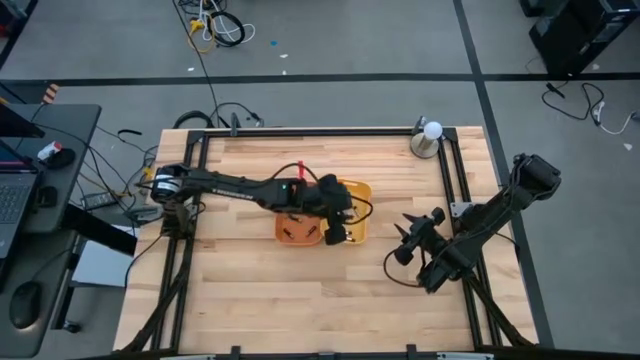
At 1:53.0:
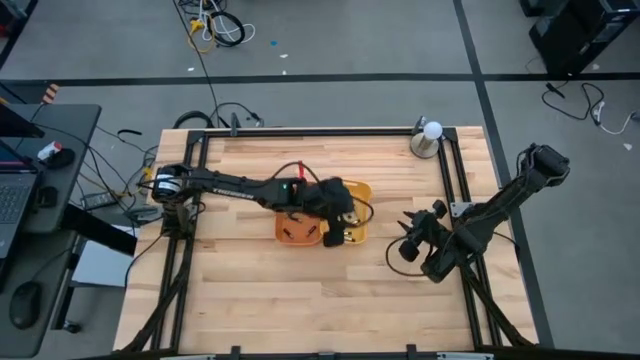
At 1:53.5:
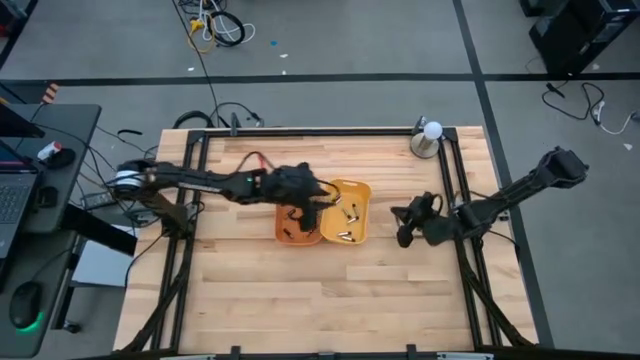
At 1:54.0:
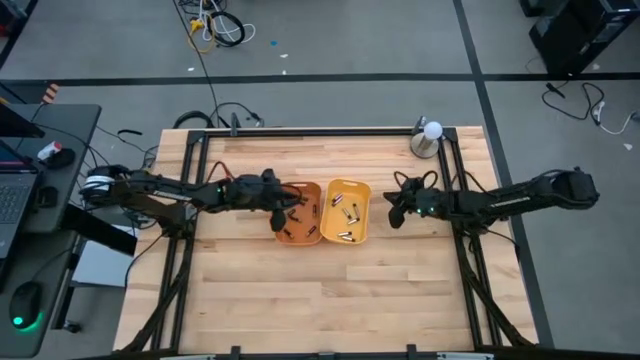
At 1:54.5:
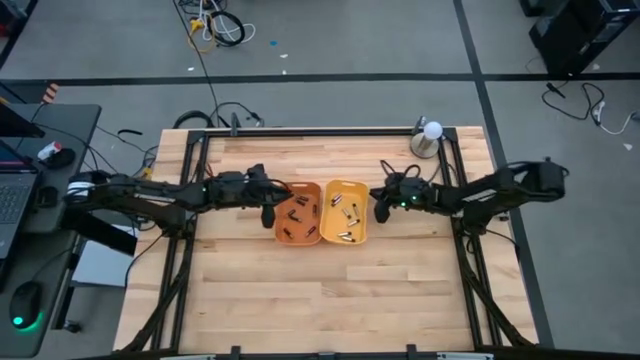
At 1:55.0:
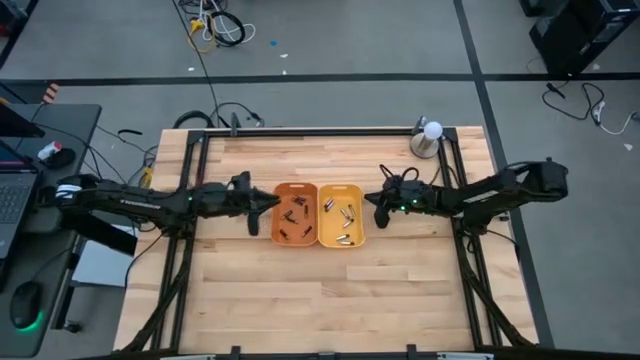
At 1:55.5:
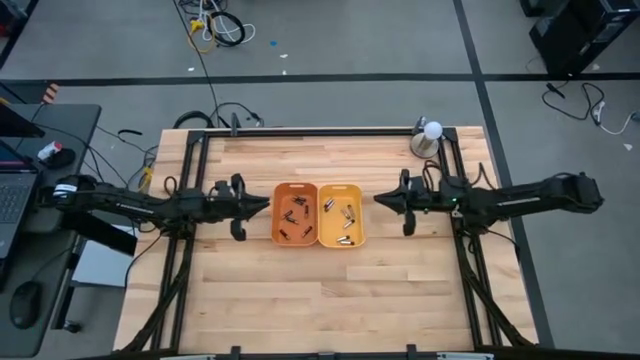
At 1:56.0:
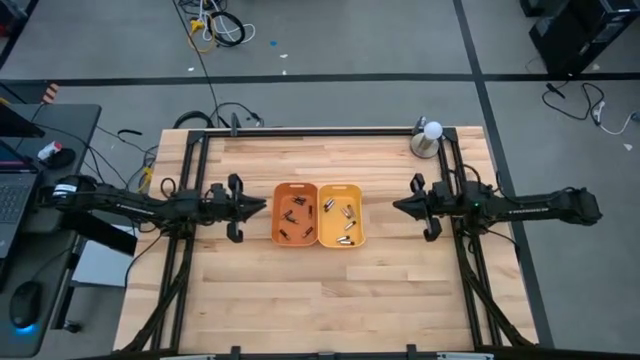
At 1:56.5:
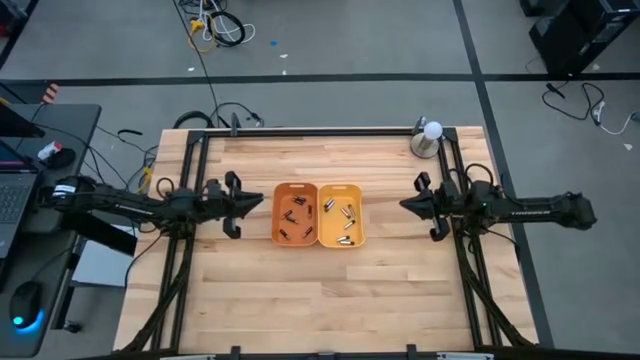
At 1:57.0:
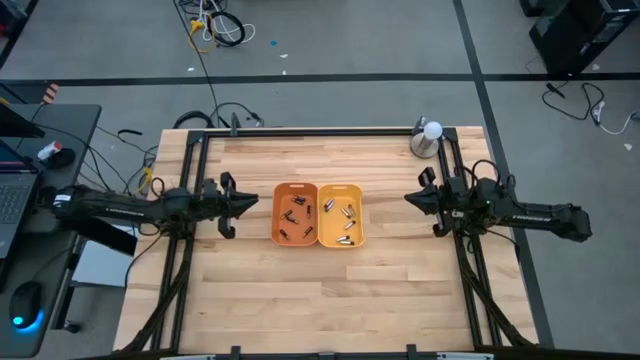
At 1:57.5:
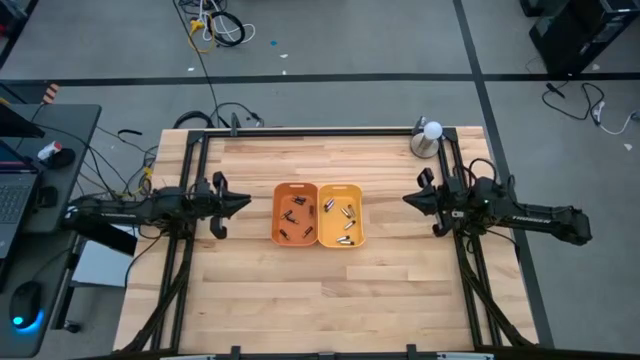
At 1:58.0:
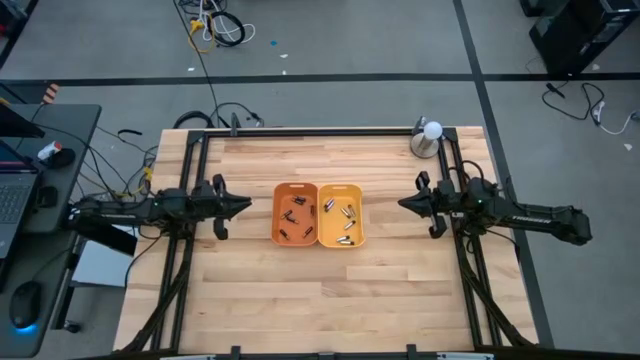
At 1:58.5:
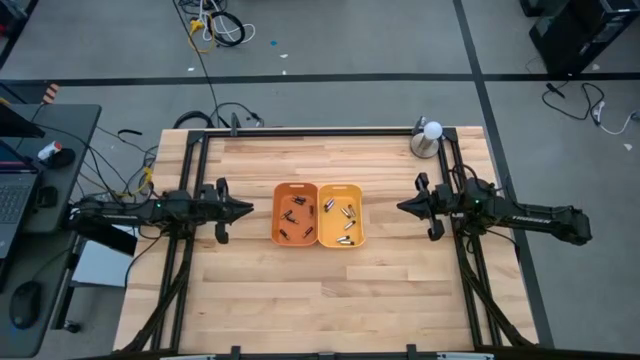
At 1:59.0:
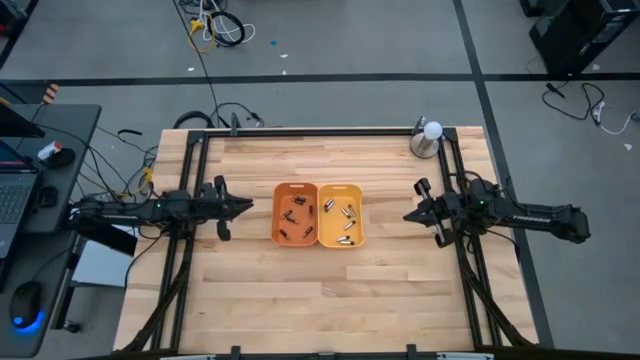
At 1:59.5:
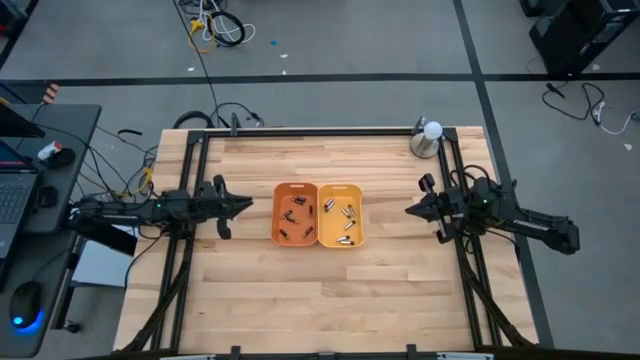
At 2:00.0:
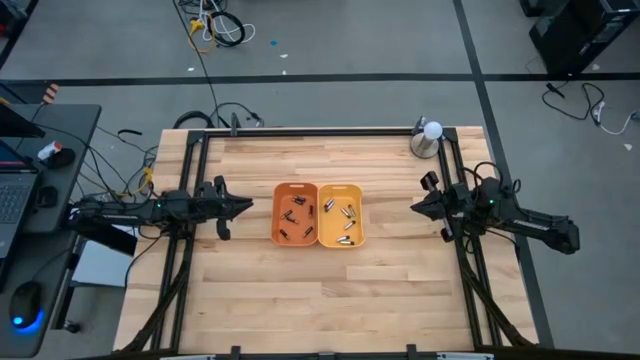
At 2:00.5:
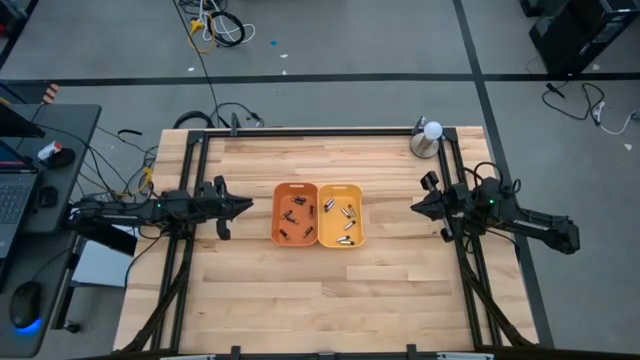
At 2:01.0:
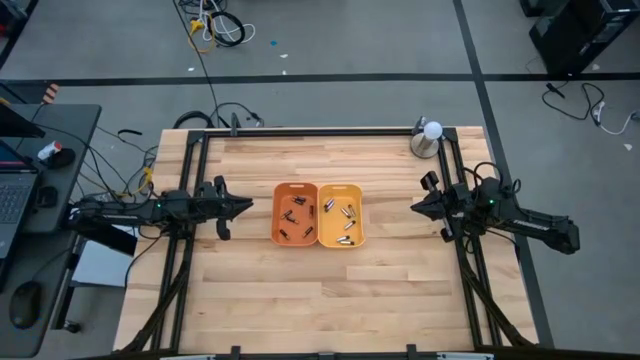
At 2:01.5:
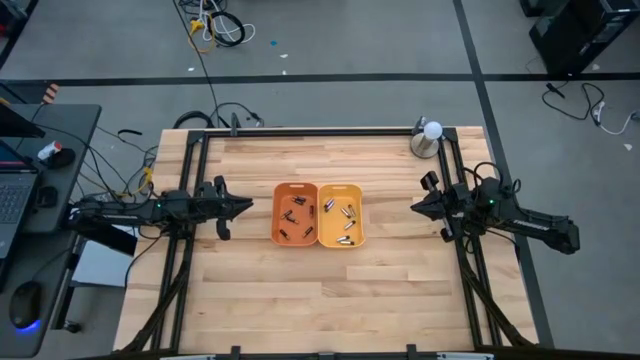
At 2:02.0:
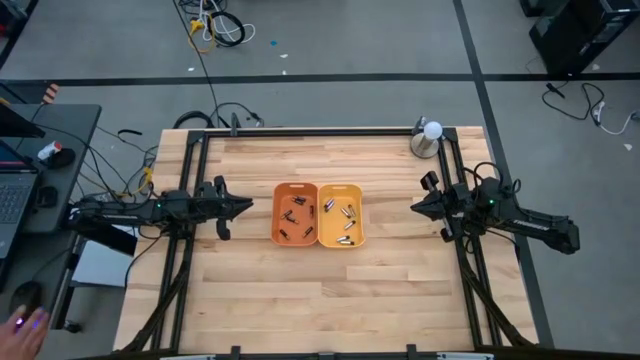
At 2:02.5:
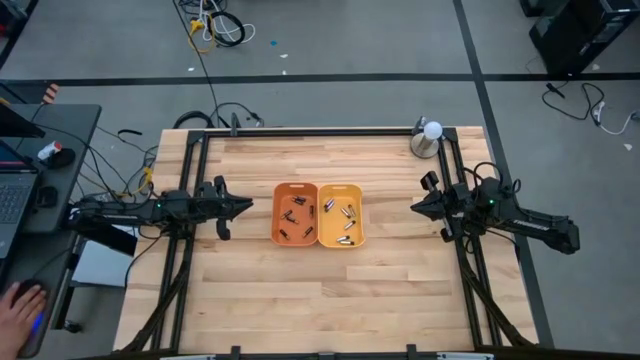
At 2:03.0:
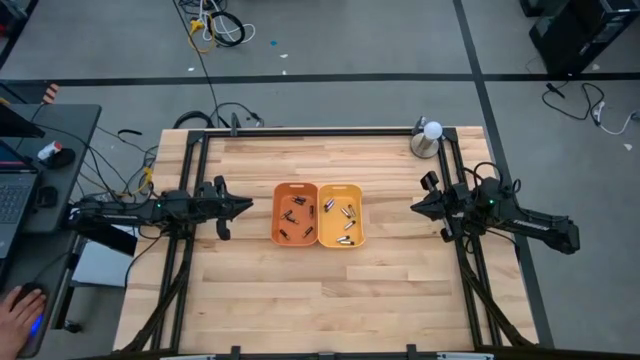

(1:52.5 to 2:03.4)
Task: Sort batteries
Return to Home Position

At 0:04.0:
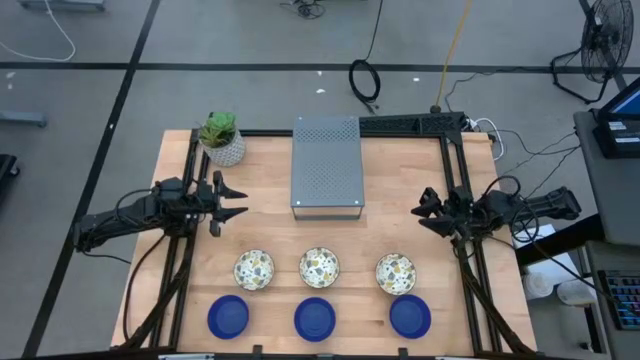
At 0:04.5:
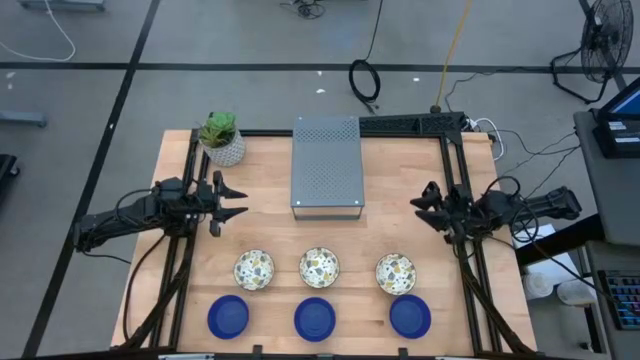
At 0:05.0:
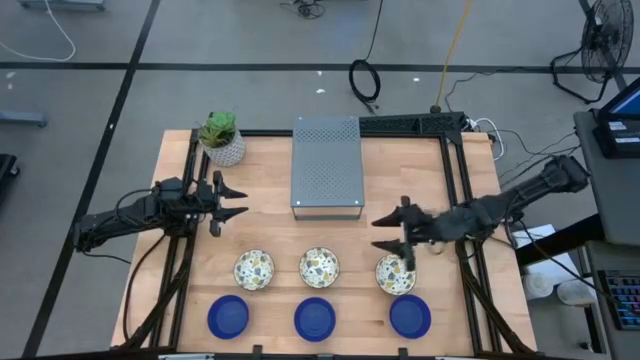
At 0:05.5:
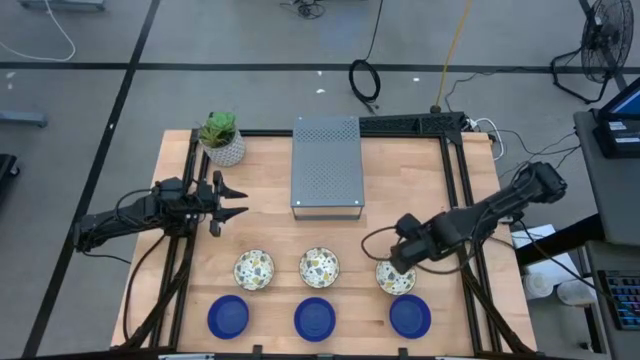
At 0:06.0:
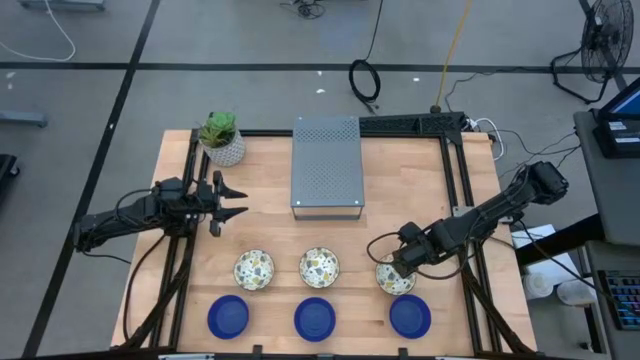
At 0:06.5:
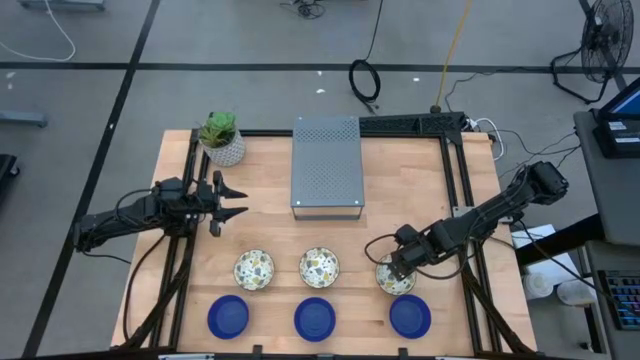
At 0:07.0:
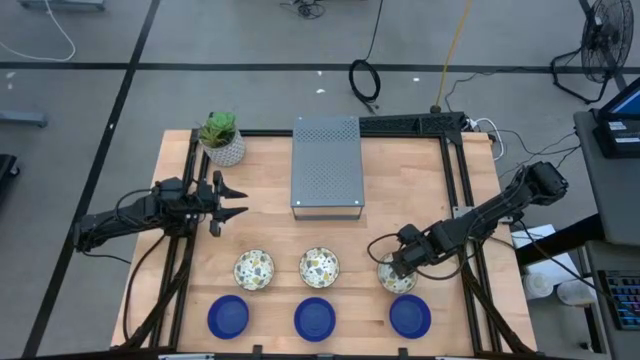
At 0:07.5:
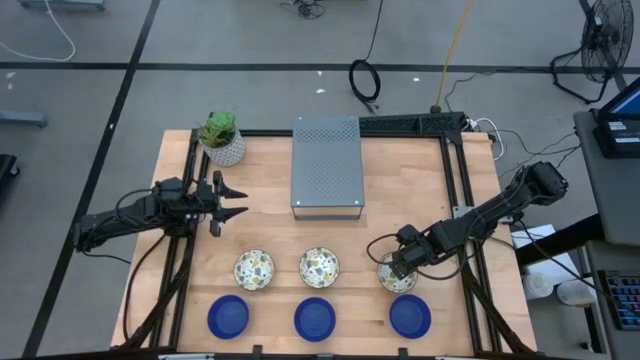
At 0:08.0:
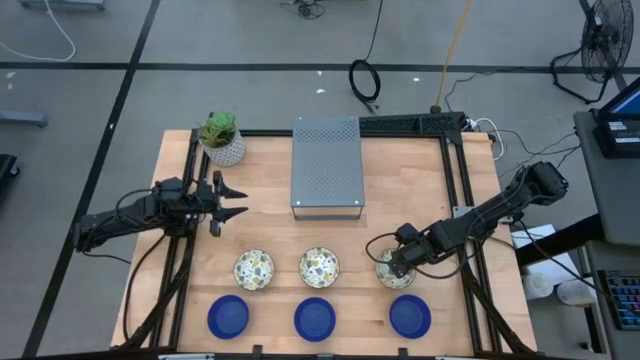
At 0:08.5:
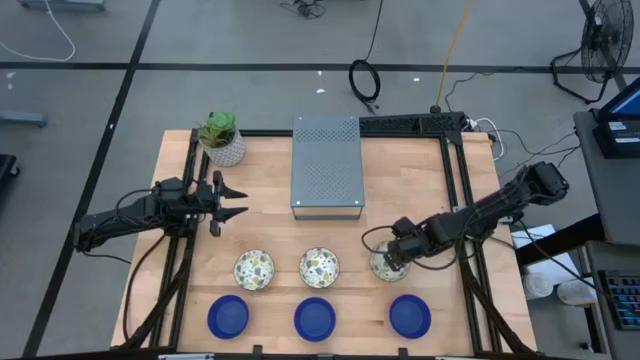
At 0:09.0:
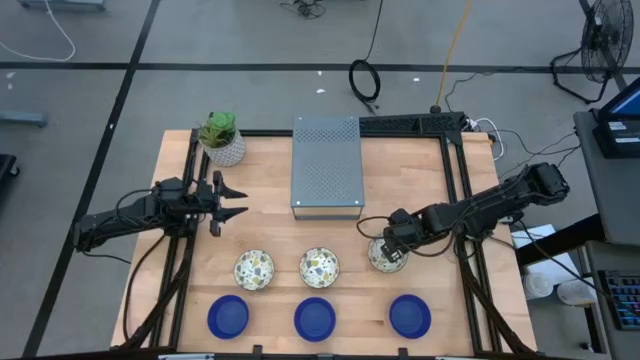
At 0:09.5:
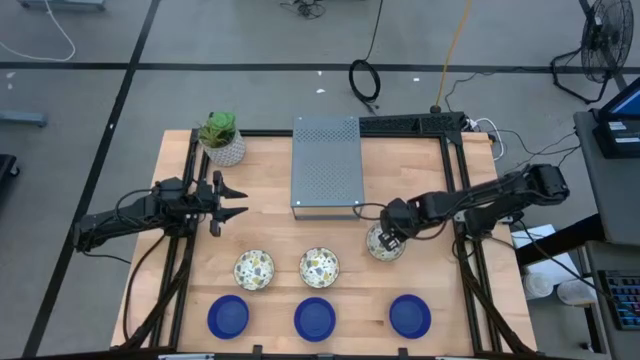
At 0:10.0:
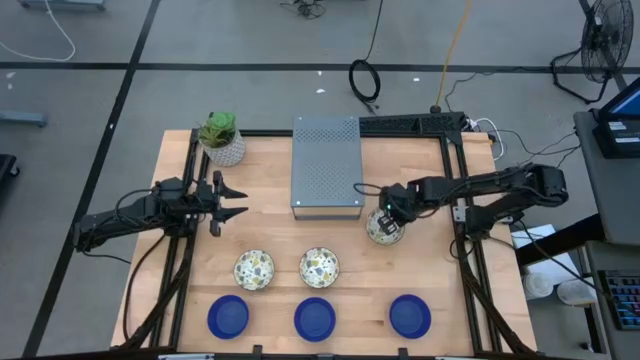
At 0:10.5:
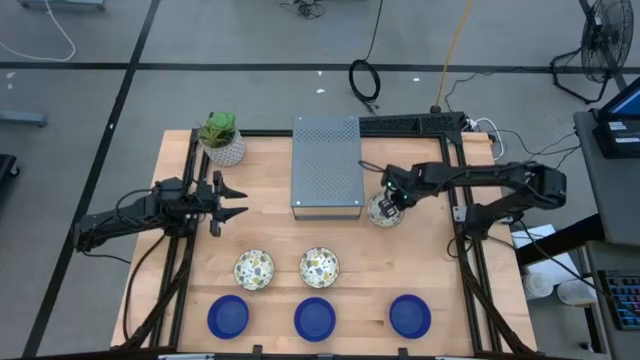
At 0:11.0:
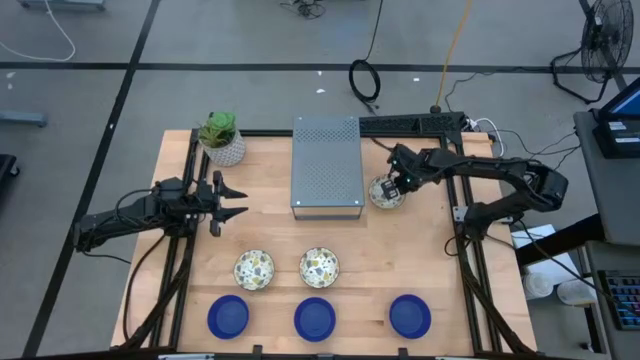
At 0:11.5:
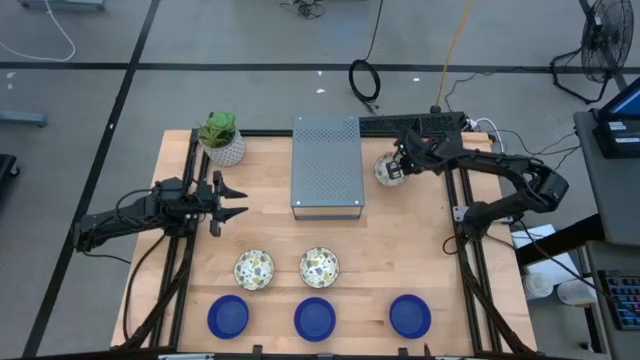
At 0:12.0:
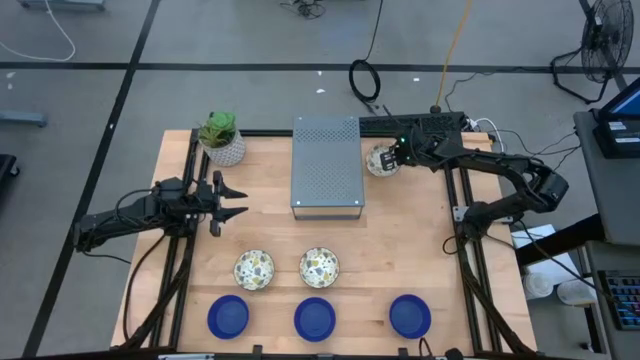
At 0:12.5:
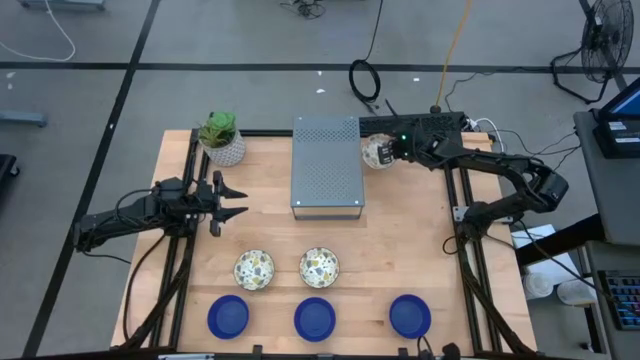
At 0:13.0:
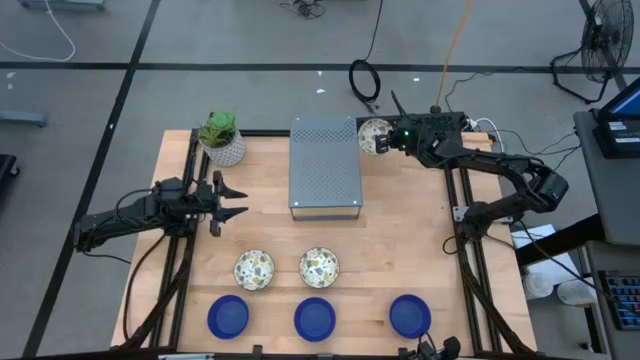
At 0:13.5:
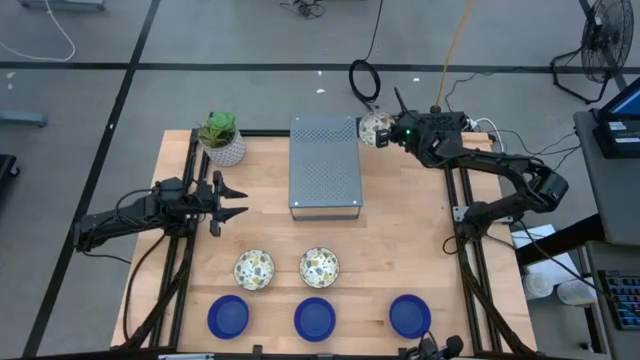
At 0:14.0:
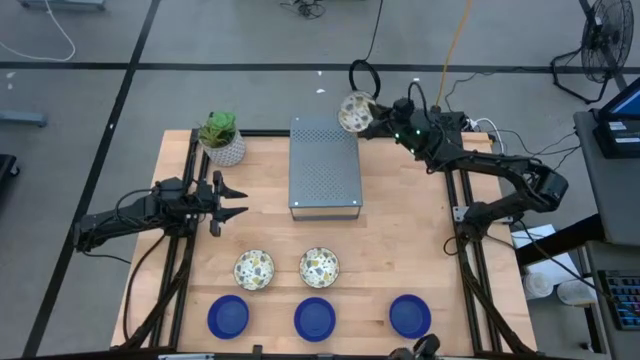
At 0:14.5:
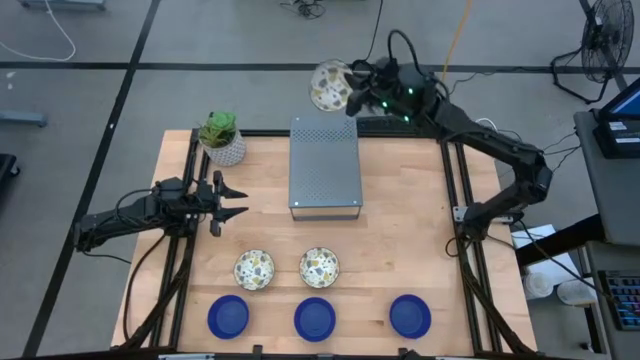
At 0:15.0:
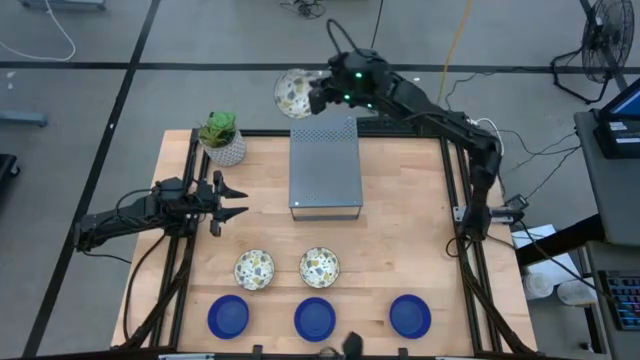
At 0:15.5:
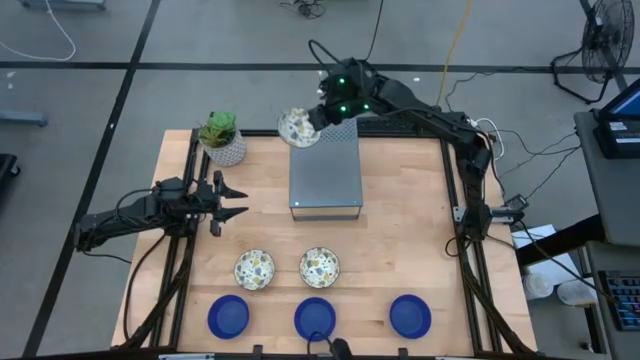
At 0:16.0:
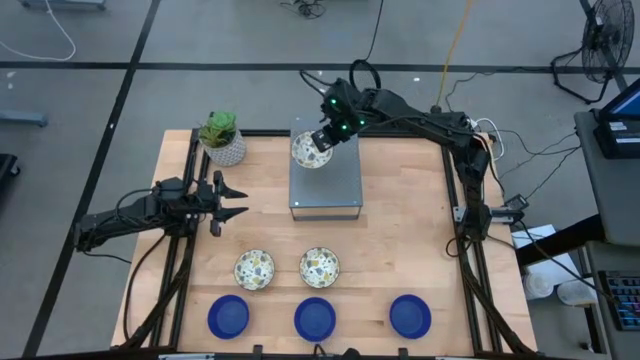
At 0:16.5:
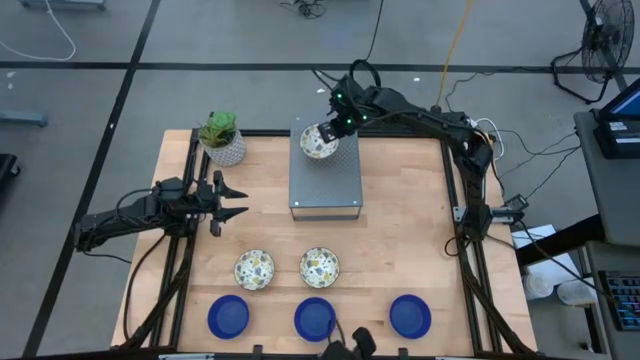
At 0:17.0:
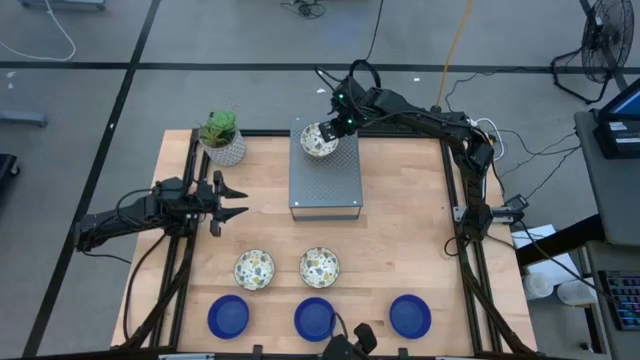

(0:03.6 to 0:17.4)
Task: Pick & Place Mini bowls
Put the right yellow patterned bowl on the shelf
